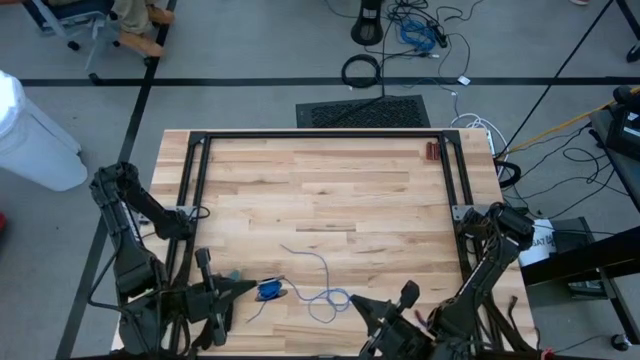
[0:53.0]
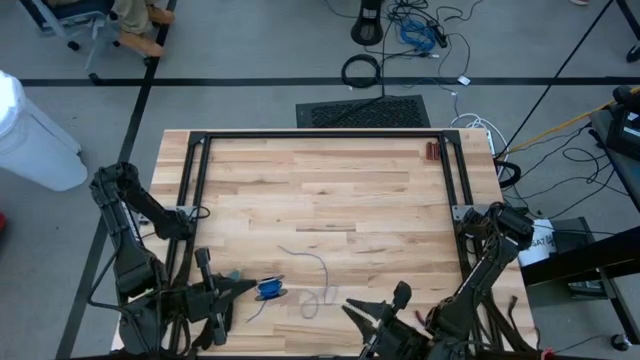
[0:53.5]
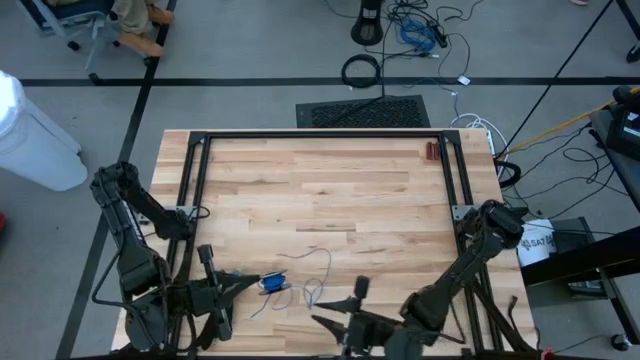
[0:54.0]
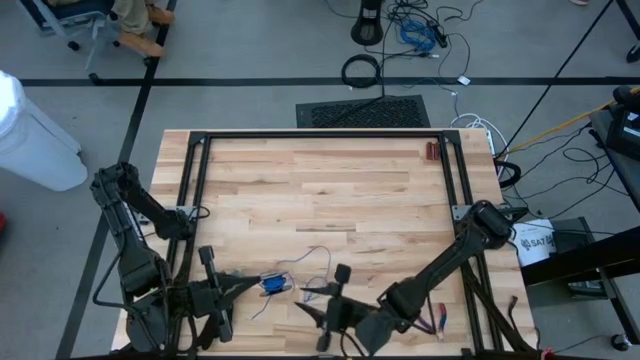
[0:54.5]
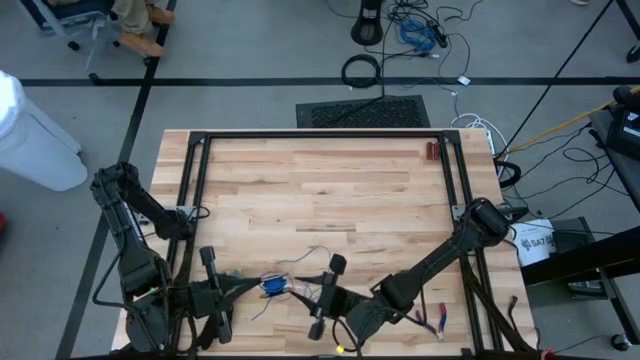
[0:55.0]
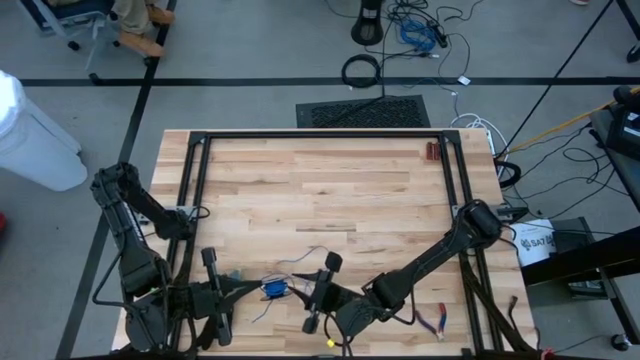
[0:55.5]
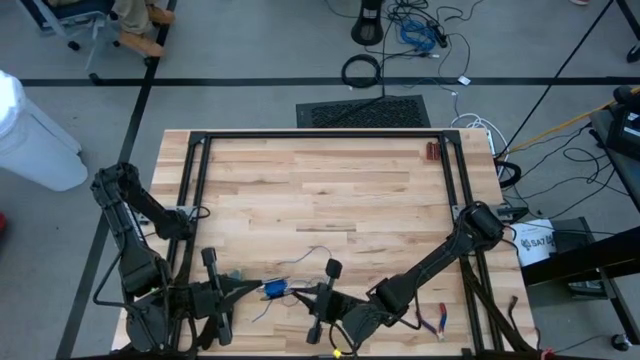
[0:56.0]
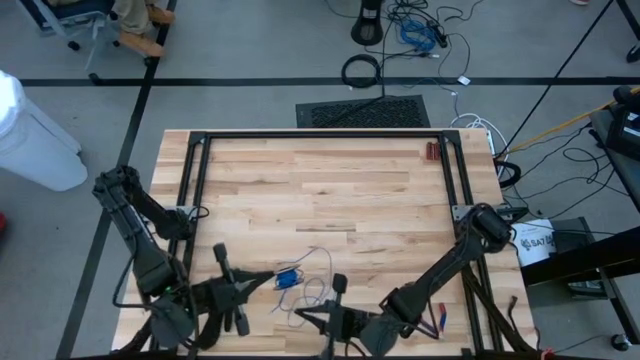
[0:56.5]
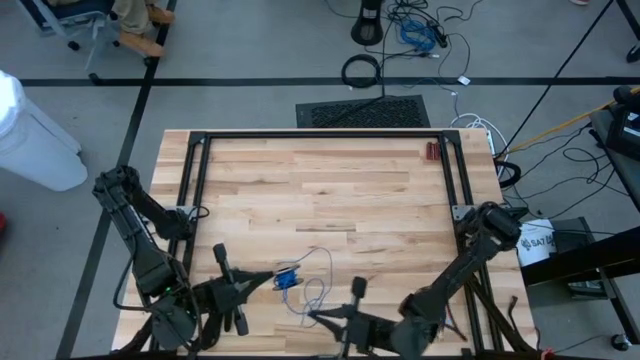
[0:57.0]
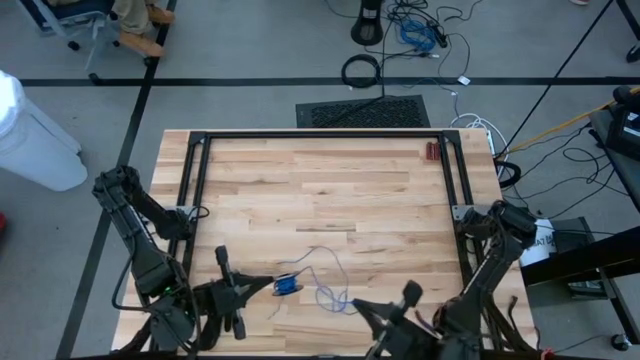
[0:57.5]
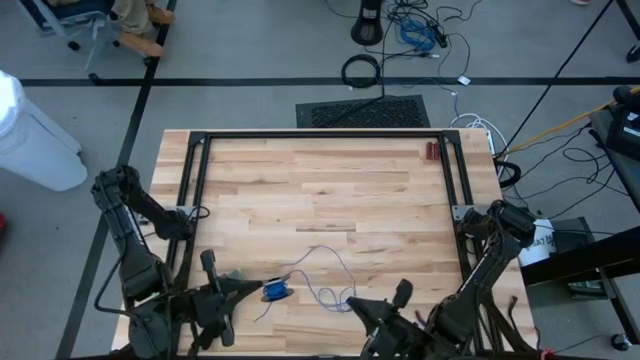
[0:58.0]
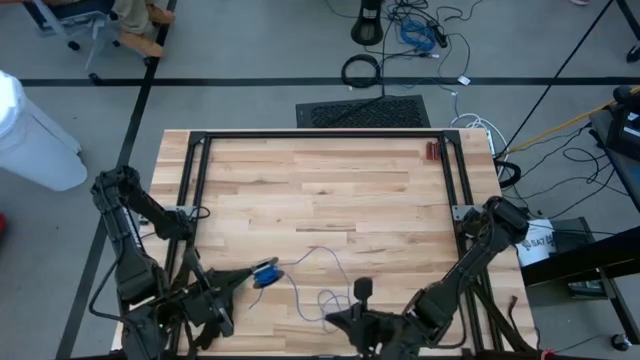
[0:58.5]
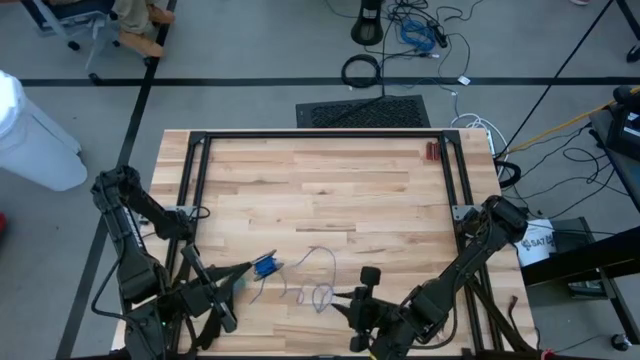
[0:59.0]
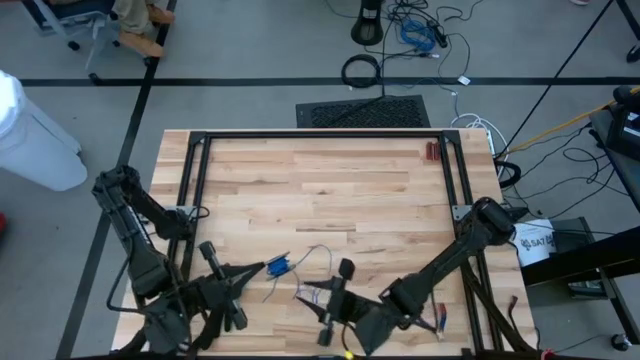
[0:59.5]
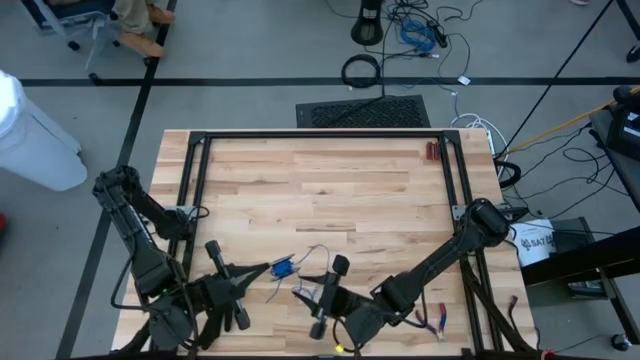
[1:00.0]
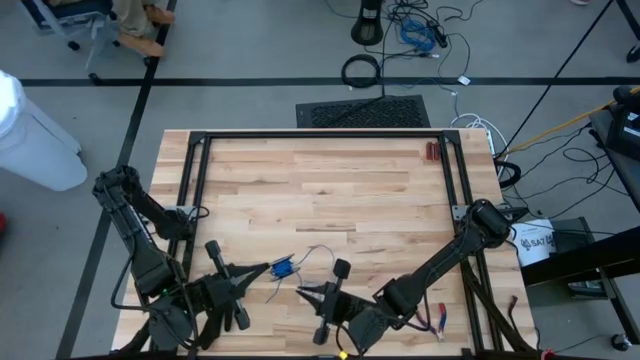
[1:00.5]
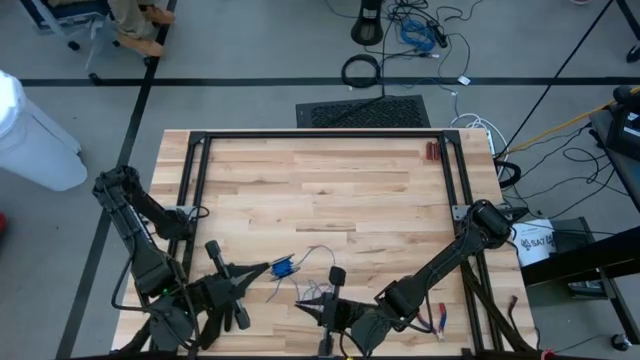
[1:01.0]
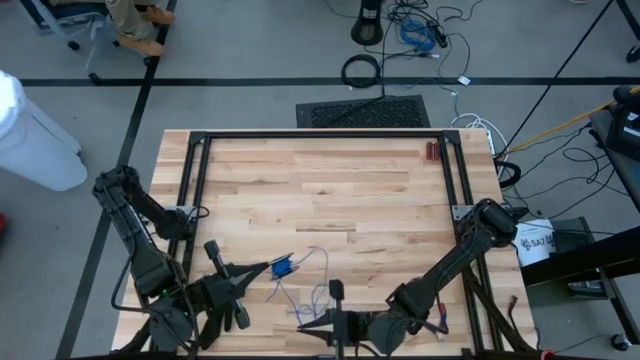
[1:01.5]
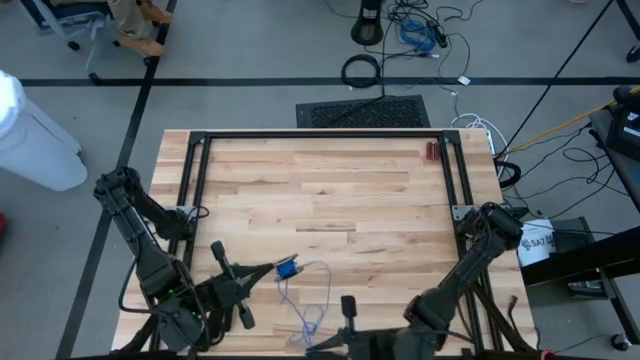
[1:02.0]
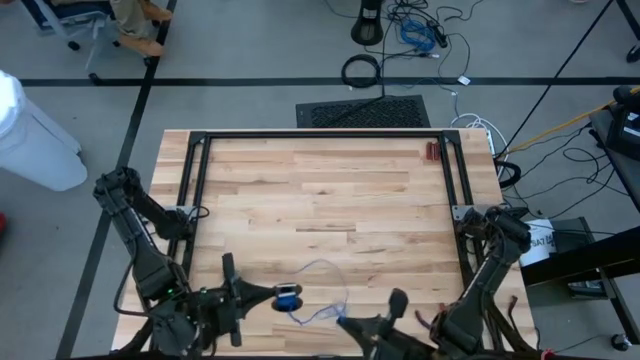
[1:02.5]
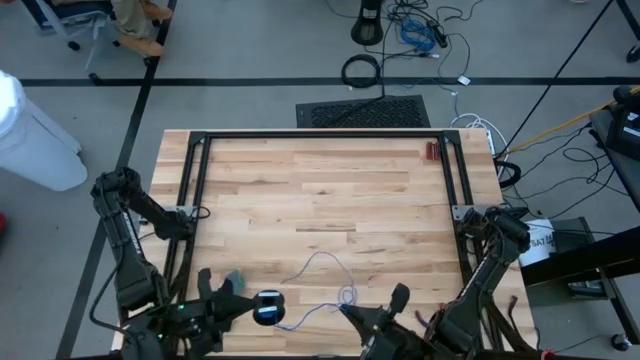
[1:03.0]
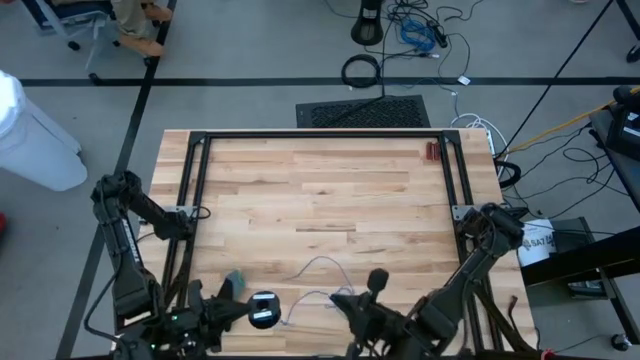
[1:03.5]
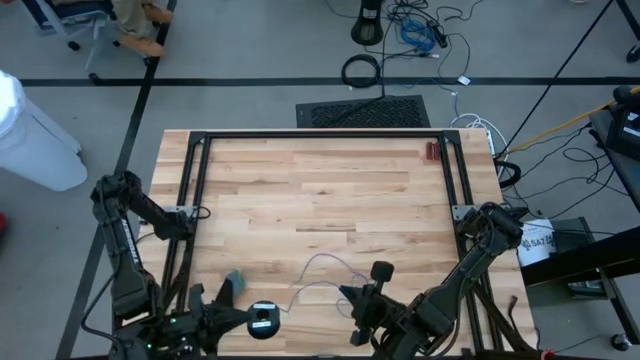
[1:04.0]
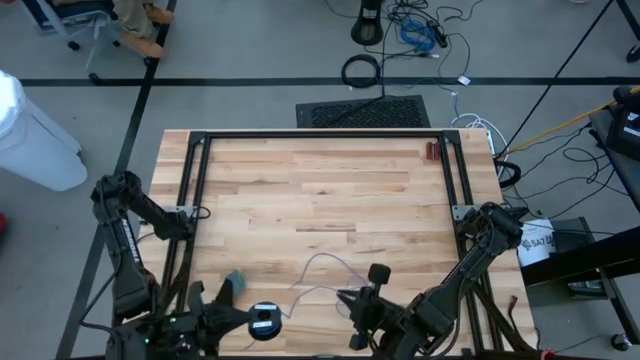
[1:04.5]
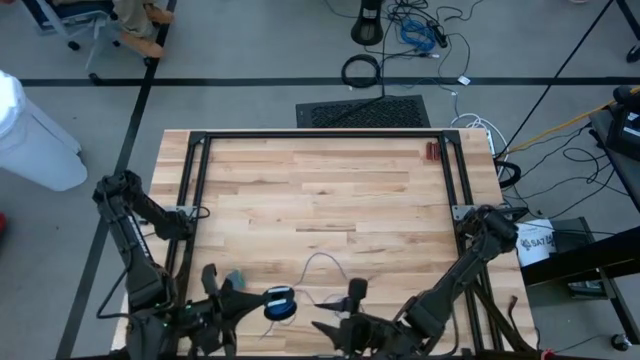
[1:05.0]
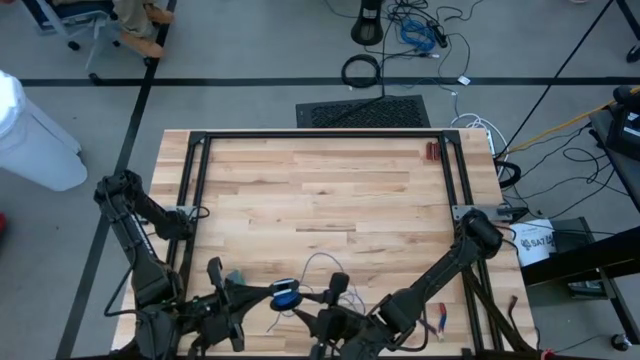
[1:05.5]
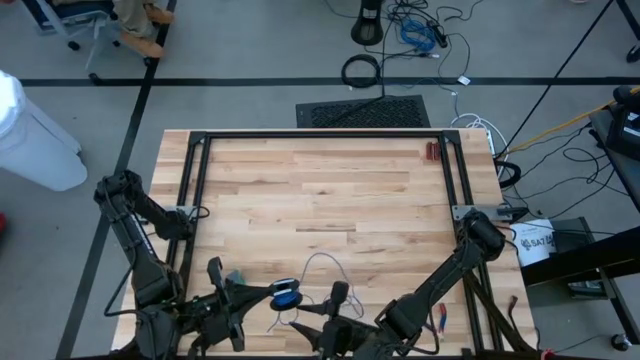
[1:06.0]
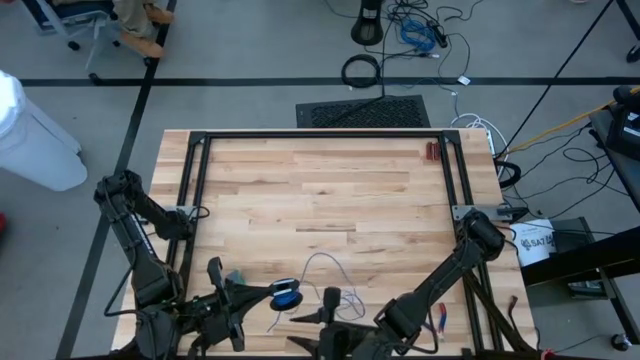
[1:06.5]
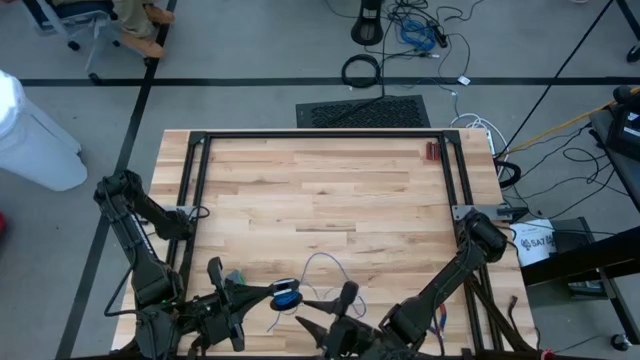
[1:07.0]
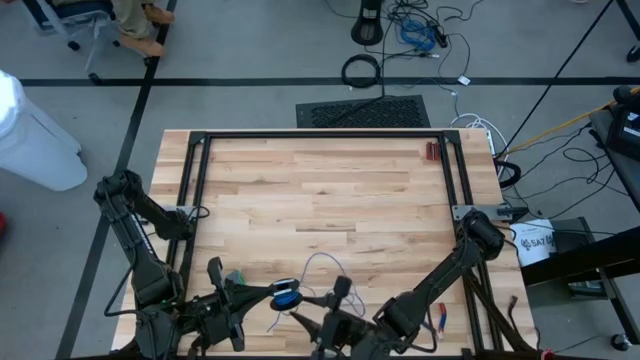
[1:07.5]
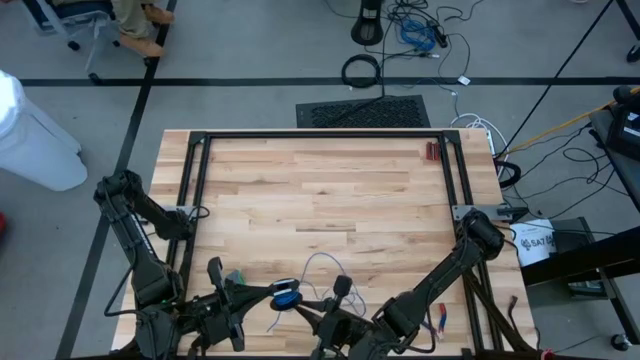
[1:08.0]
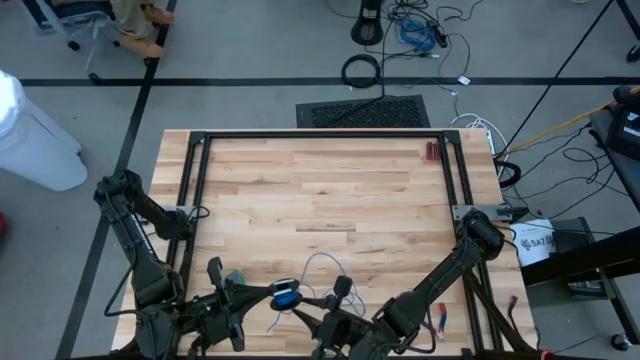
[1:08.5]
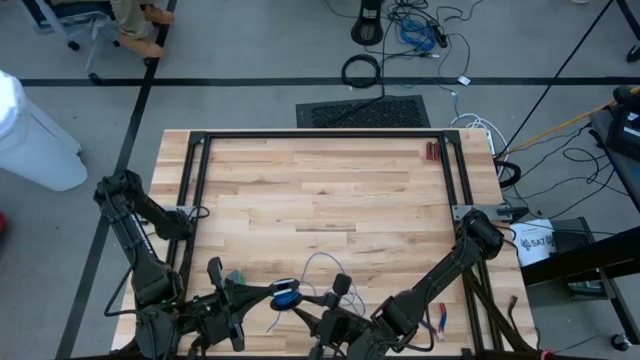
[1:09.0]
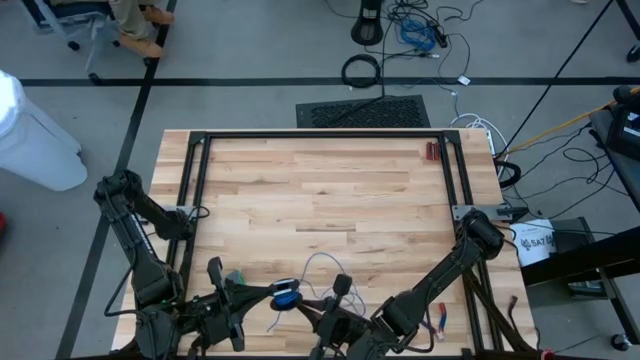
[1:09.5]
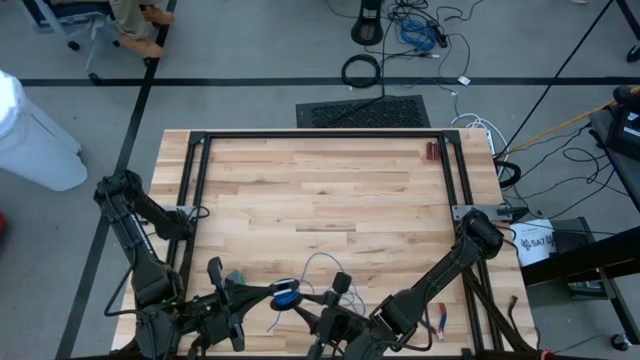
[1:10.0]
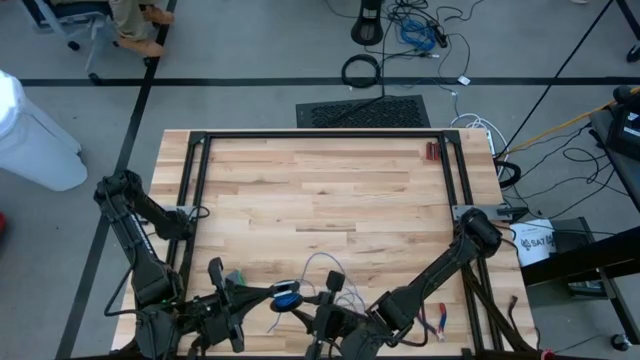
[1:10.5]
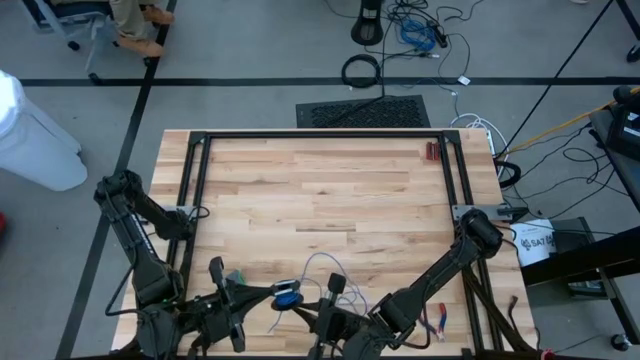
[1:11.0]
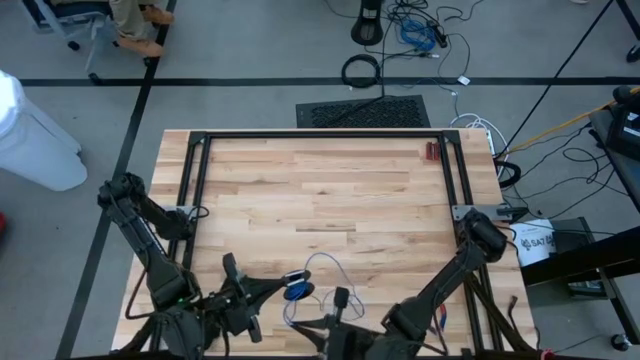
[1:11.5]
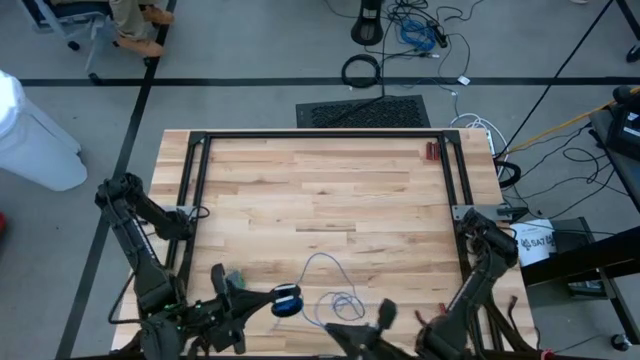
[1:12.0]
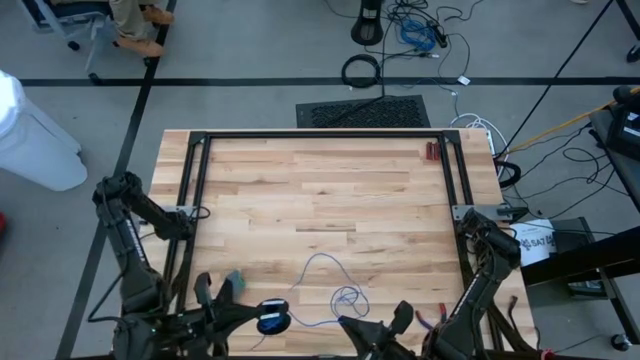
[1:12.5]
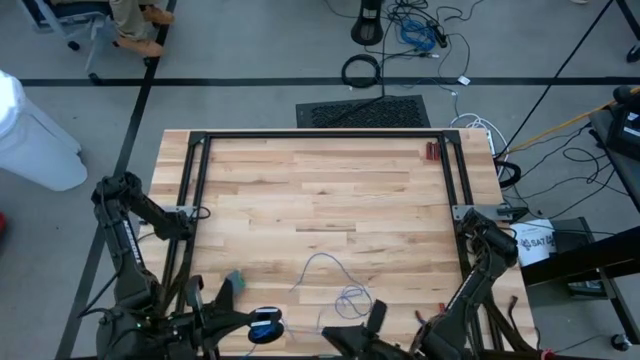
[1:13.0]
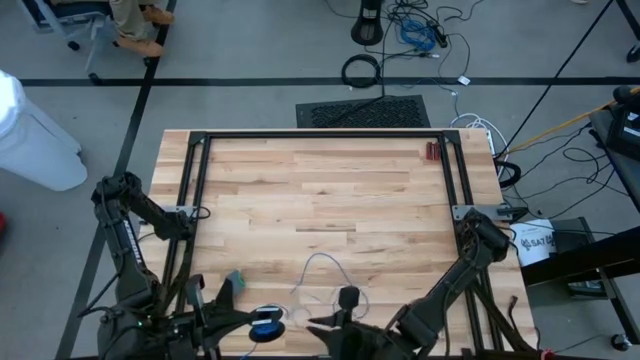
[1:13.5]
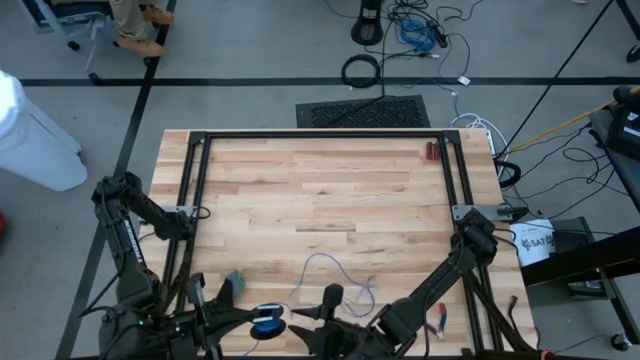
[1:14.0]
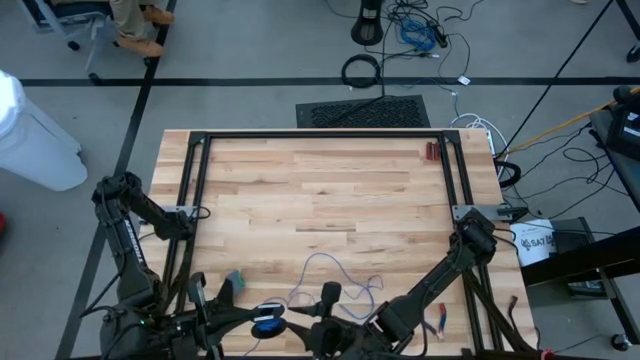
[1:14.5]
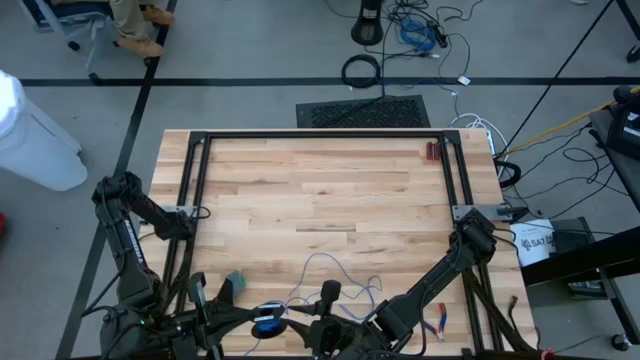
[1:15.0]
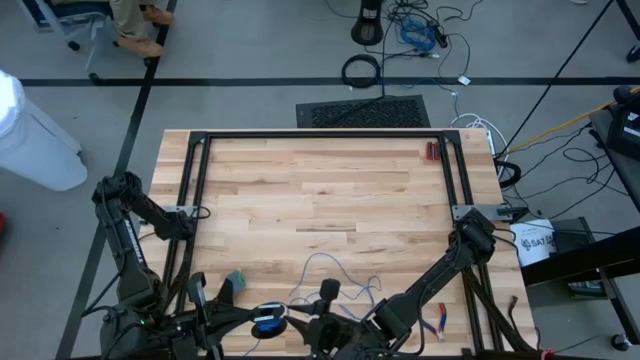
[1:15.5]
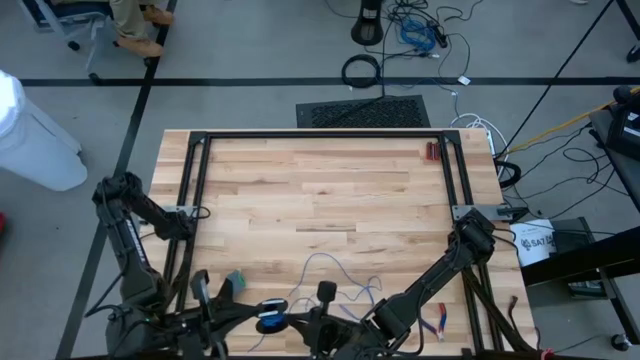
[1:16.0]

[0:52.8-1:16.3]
Task: Coil cords
Uncoil the blue wire from the black spool
